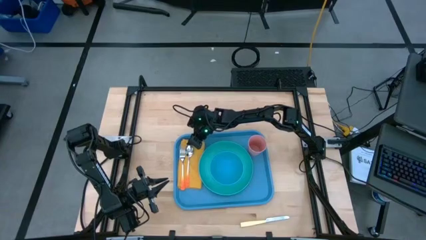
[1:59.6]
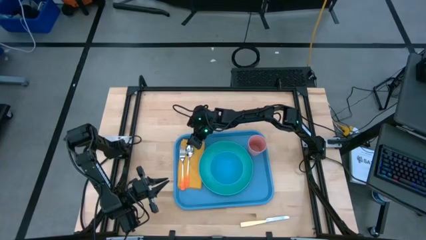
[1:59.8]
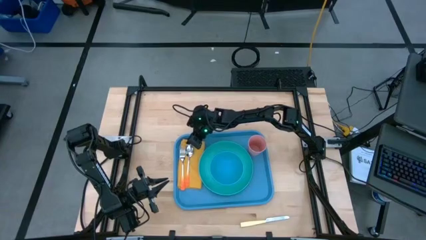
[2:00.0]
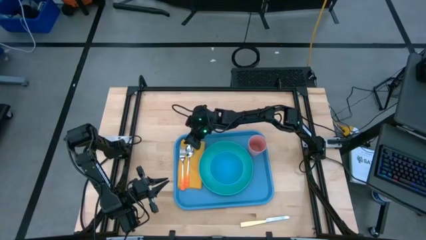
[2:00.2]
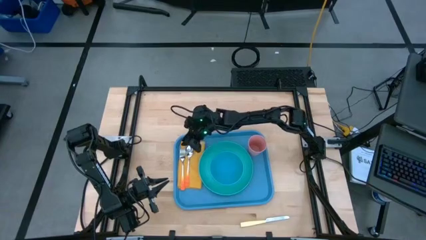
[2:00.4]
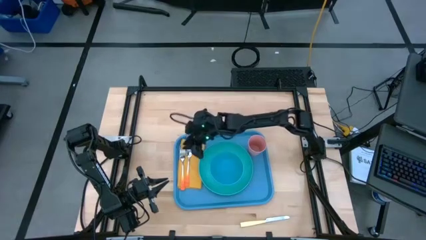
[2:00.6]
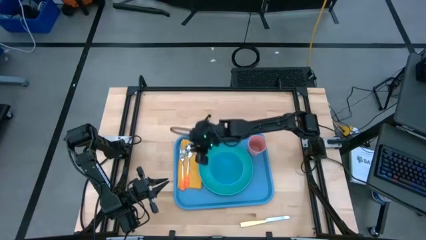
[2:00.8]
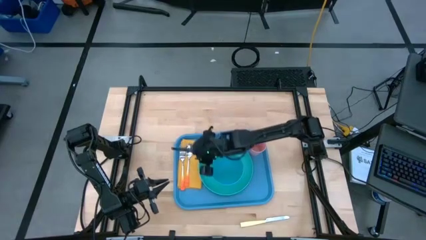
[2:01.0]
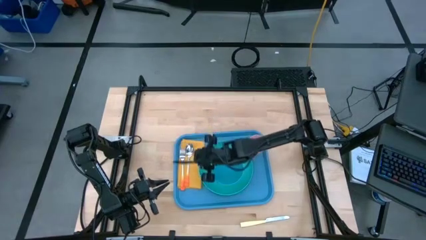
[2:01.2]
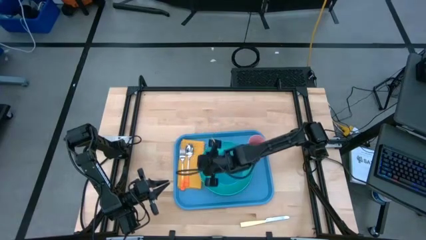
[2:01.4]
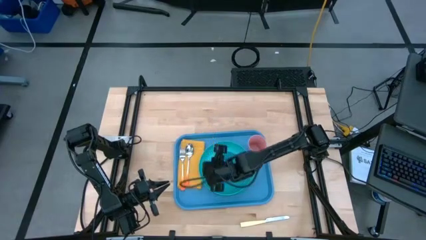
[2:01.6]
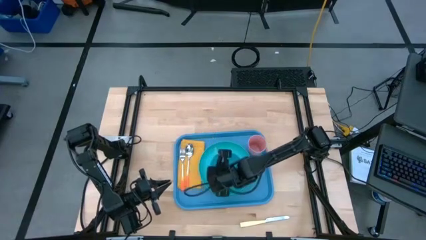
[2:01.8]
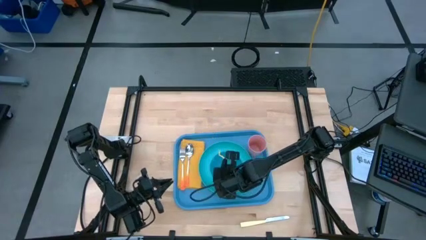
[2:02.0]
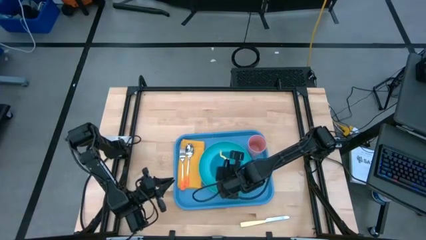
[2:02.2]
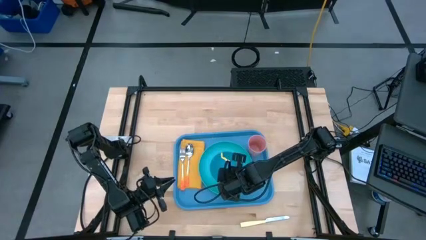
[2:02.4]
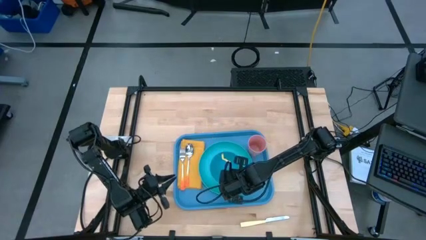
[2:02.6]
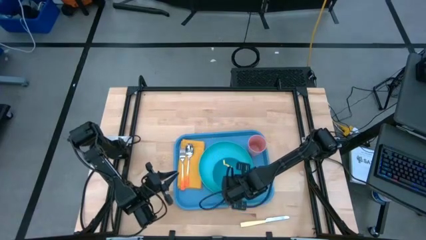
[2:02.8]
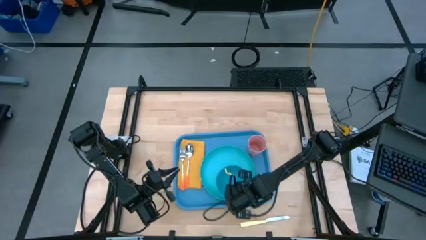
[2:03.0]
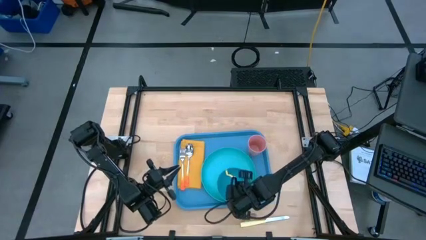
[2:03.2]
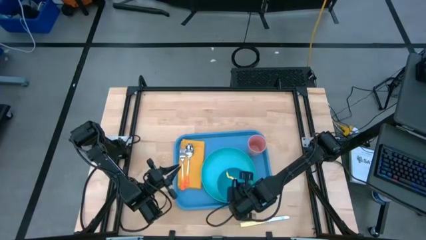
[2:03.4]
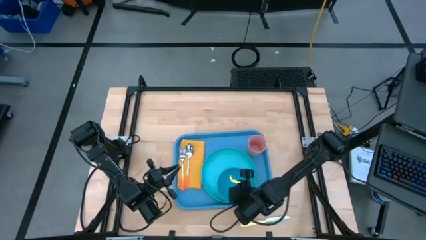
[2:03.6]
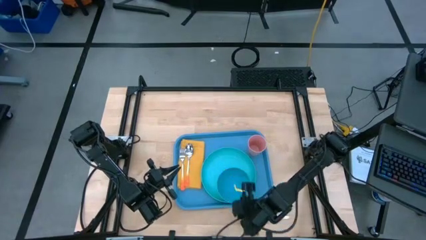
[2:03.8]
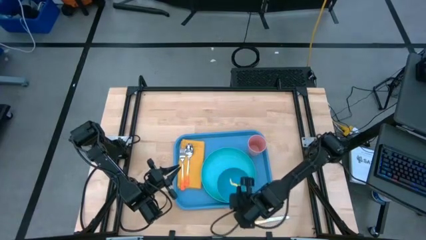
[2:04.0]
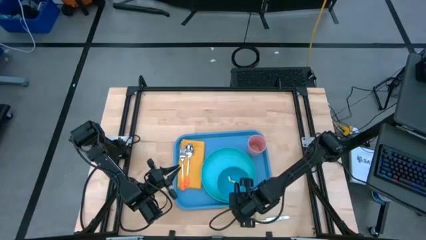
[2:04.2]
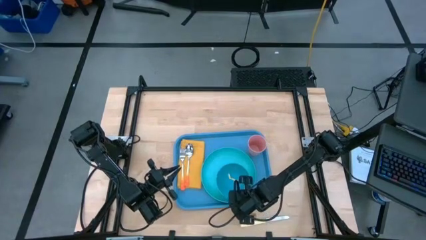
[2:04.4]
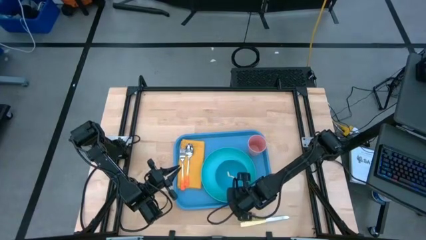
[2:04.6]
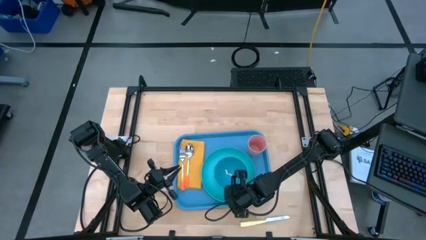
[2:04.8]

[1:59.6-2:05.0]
Task: Set up tray
Adjust the blue bowl on the blue plate

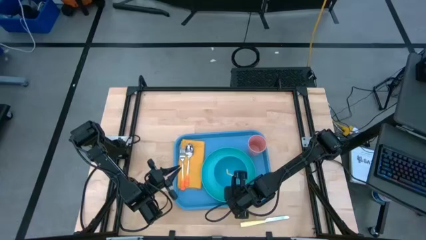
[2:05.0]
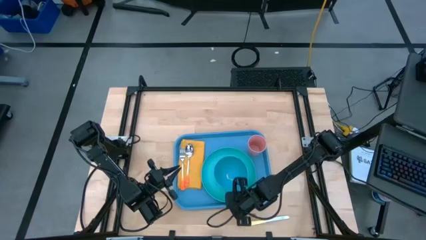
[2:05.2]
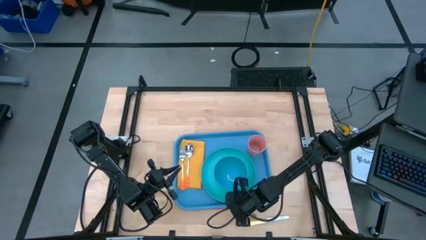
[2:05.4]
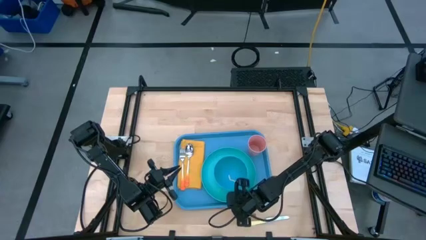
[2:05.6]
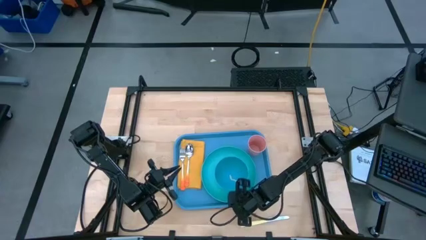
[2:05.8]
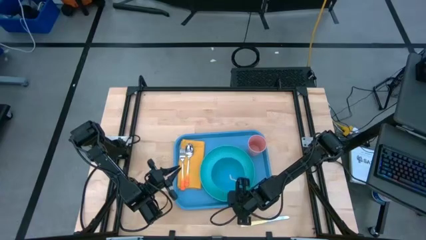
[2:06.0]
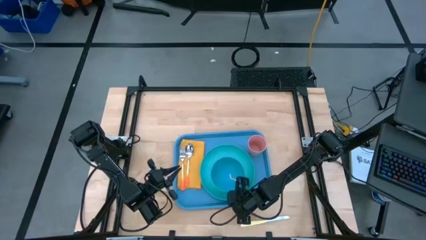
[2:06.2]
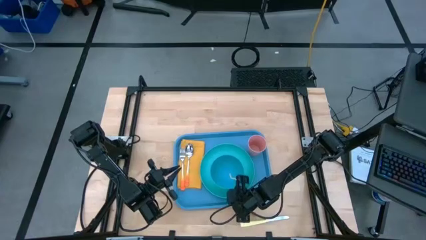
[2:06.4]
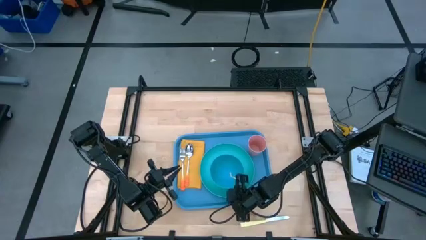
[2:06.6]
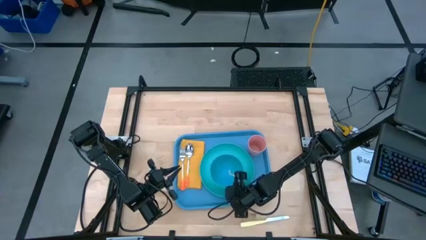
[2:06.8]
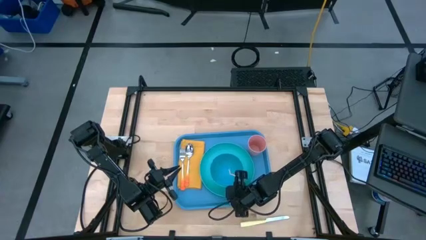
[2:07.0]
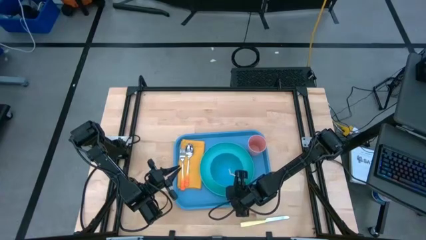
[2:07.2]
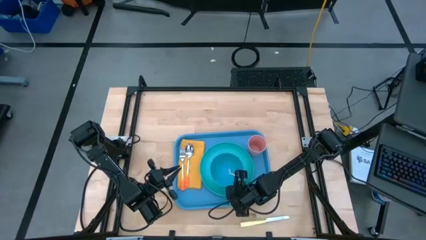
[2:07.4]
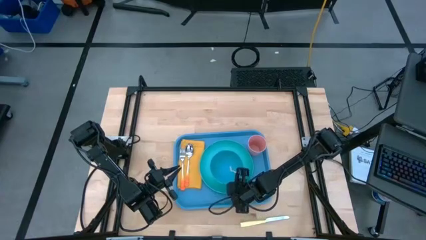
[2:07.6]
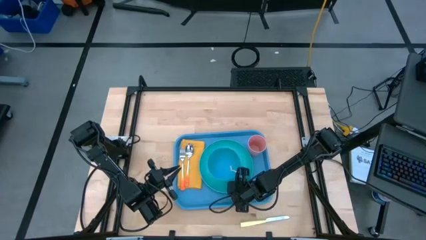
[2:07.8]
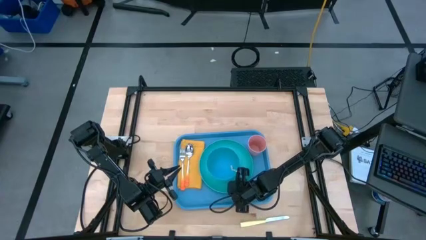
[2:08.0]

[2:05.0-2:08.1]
Adjust the blue plate on the blue tray

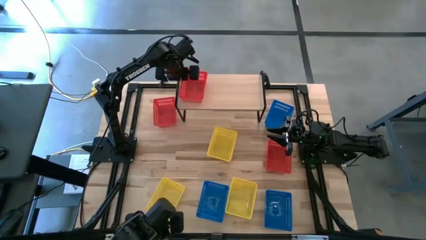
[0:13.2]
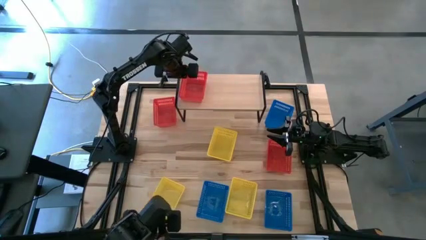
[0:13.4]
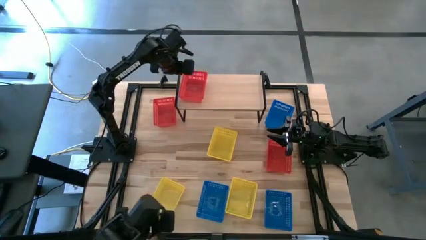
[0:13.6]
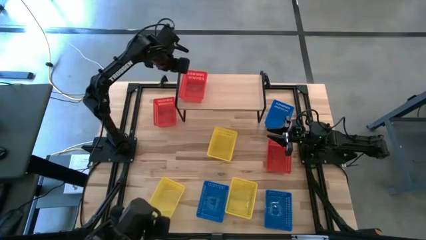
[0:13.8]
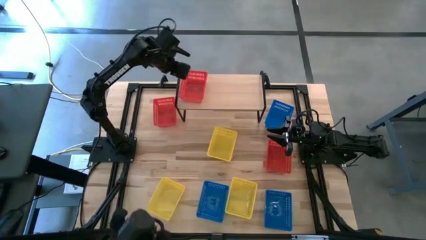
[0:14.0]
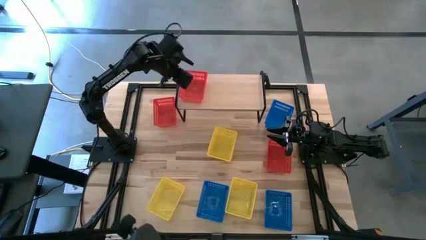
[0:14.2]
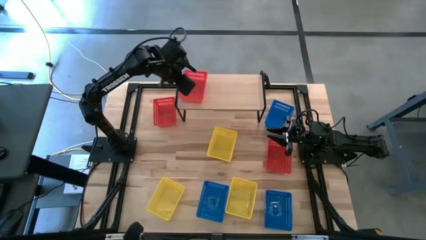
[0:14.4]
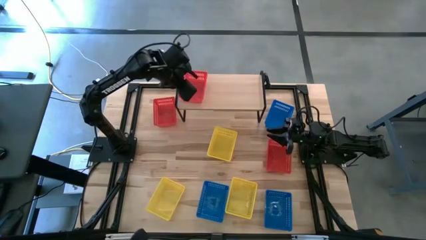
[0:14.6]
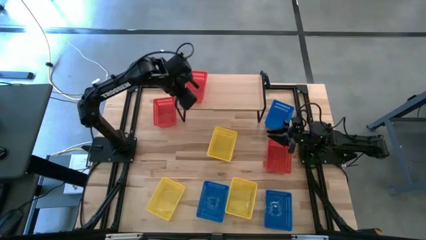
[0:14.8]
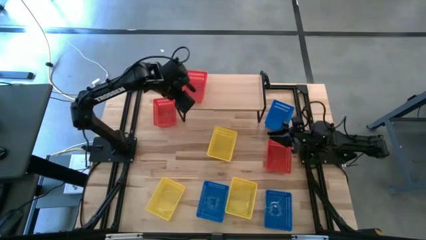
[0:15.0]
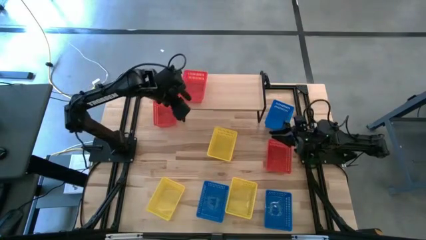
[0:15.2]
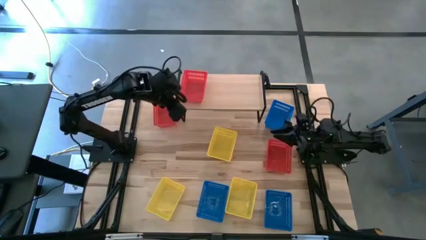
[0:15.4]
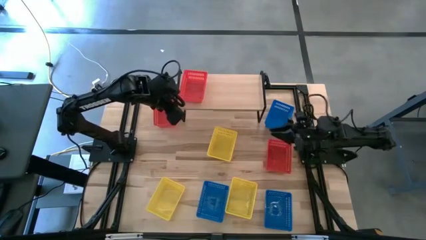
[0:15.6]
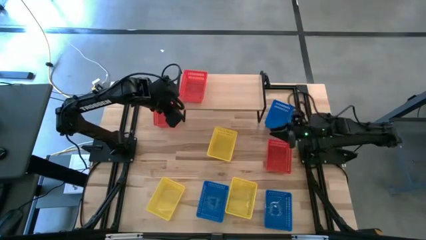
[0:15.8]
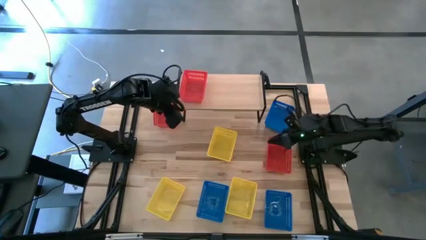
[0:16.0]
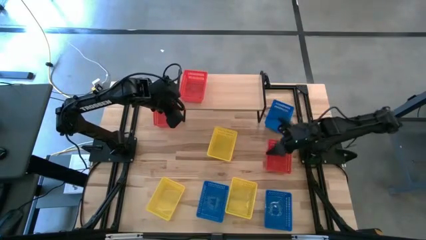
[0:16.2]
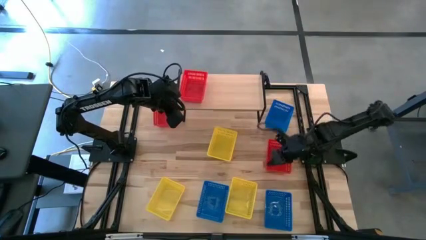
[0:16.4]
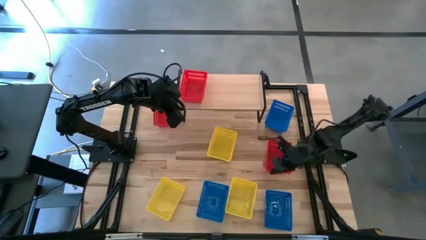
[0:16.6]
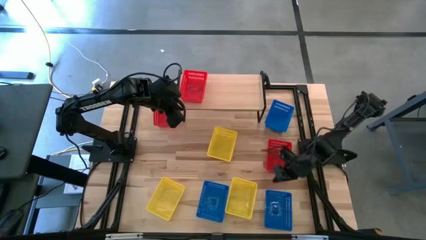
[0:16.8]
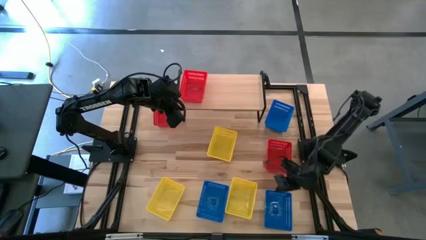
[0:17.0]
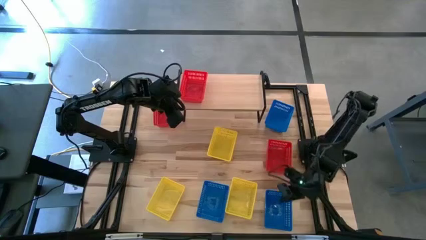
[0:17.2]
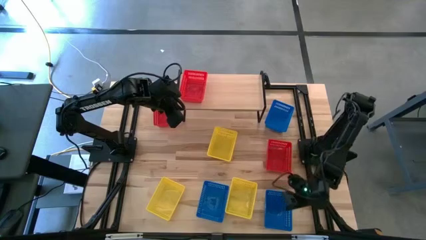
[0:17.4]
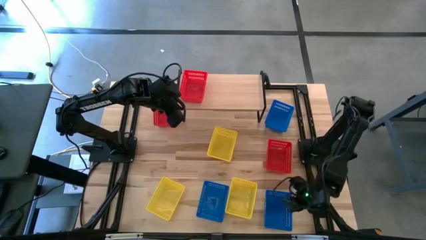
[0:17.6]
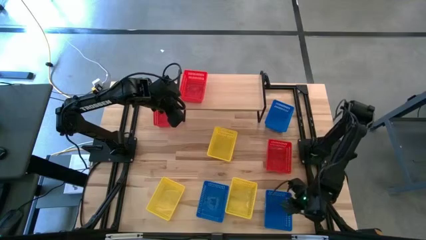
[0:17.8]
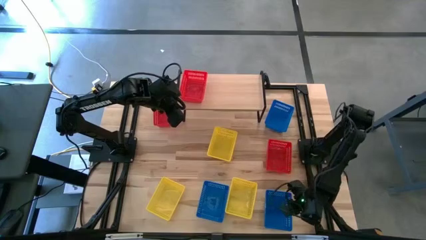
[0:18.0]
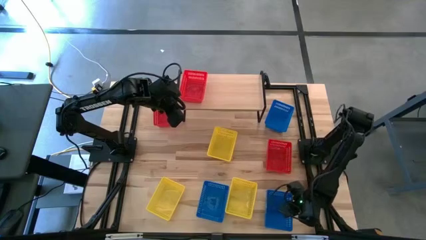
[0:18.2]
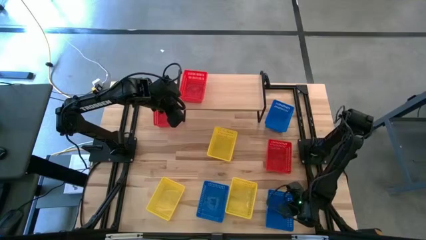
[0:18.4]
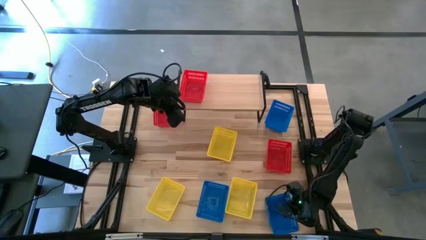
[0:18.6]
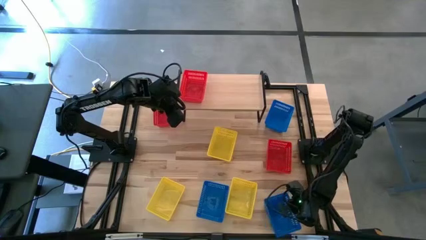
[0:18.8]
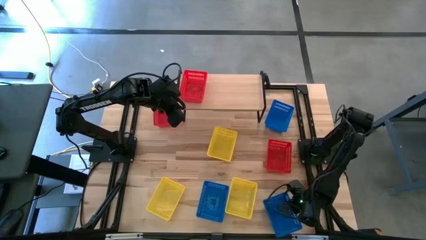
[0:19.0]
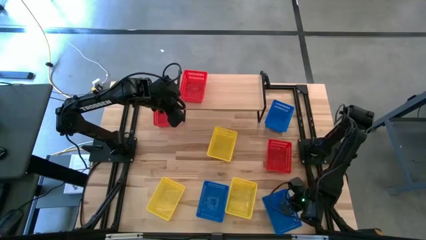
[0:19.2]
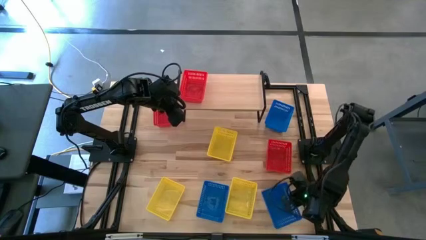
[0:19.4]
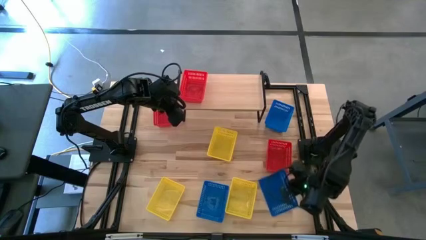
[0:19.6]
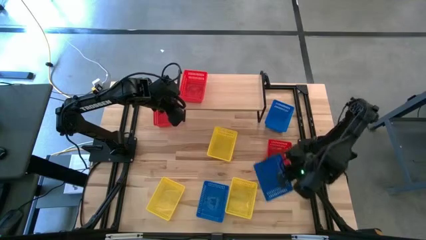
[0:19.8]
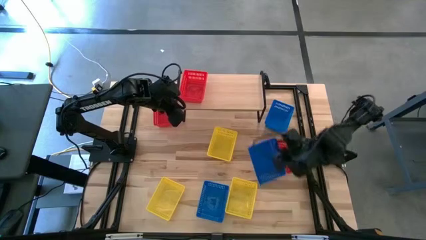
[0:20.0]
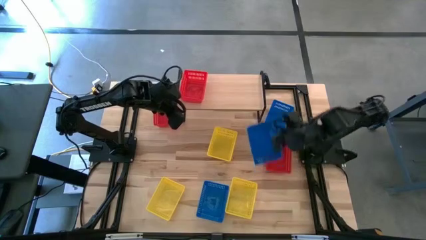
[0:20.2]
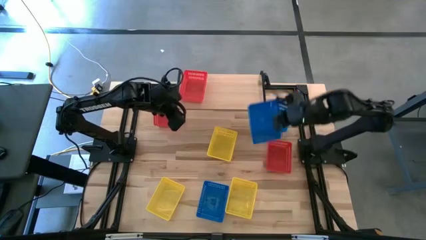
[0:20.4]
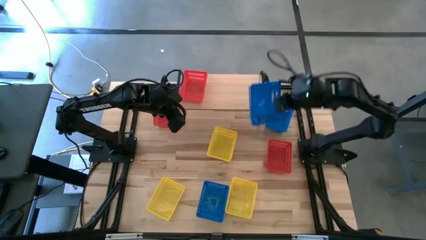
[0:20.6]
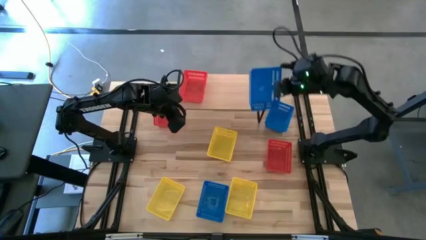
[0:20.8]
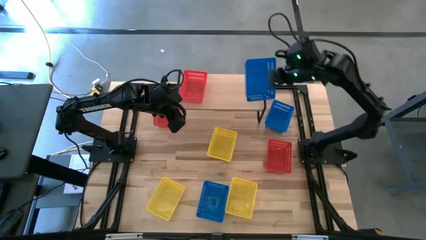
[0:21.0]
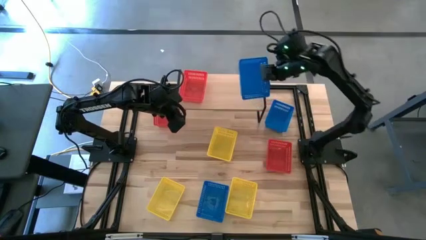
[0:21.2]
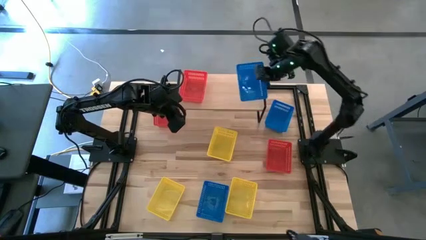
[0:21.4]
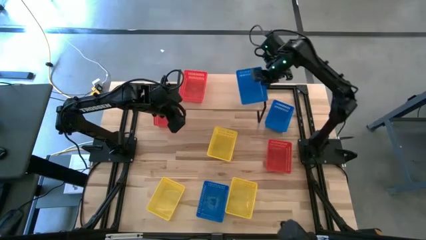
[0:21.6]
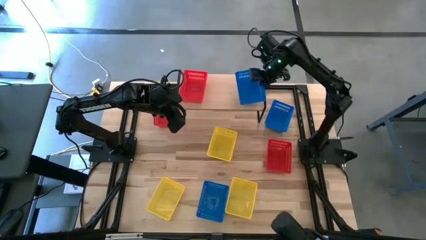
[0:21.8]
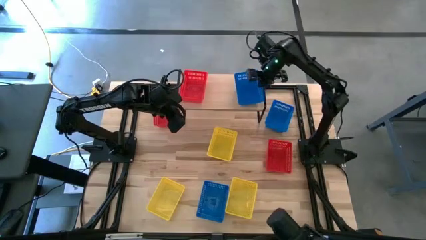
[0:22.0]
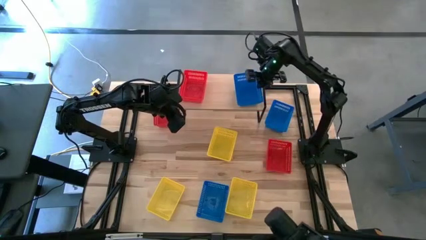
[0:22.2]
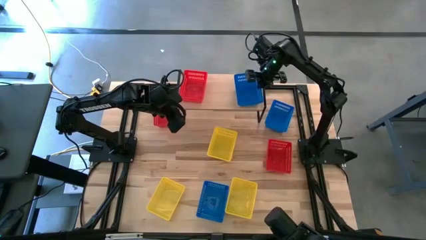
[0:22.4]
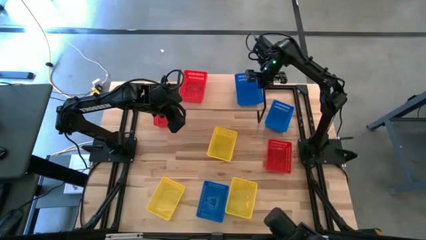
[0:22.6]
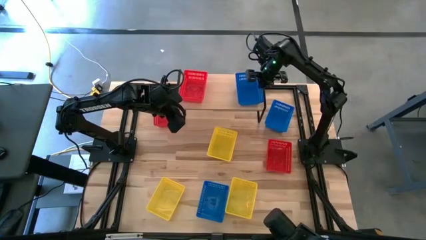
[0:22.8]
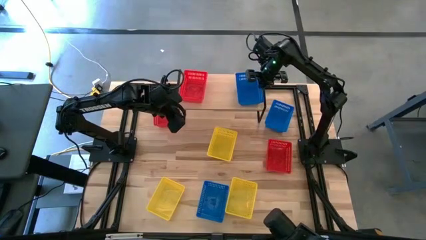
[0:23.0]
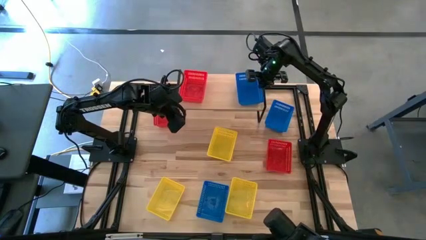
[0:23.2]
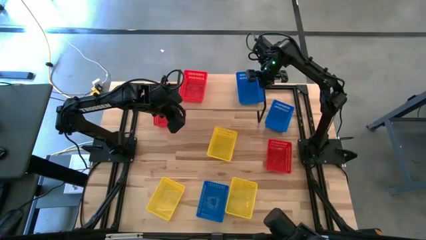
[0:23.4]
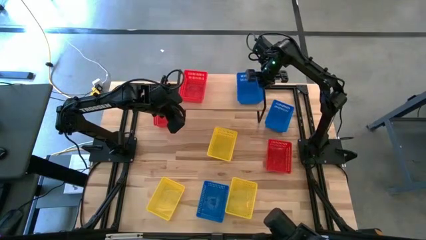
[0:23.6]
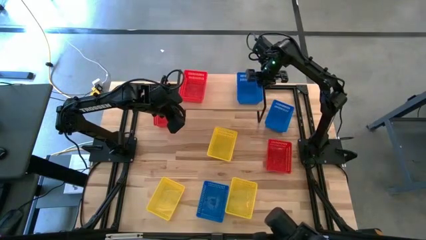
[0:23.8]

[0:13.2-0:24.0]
Task: Stack baskets on shelf by color
Put the bottom right blue bin on the shelf
